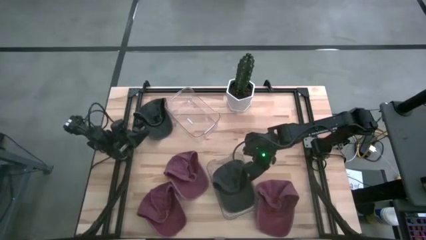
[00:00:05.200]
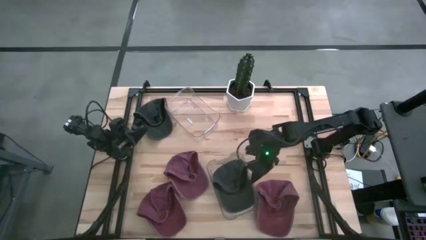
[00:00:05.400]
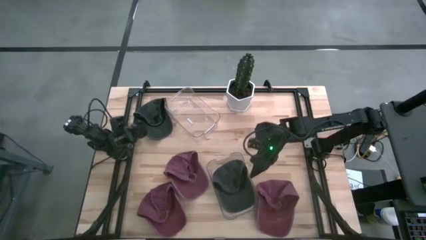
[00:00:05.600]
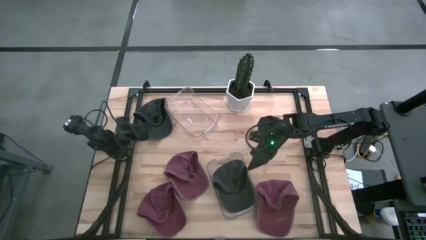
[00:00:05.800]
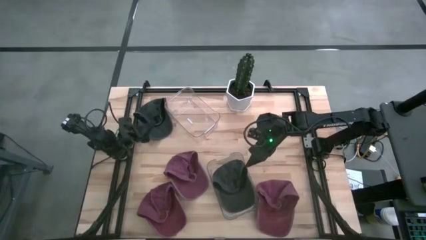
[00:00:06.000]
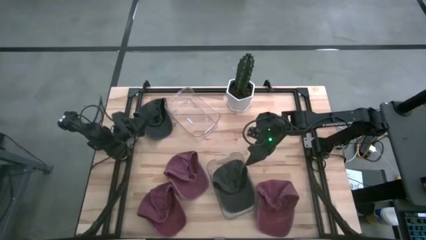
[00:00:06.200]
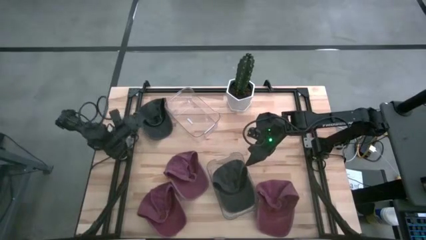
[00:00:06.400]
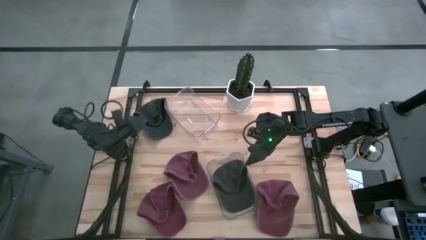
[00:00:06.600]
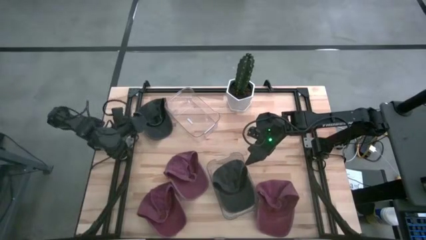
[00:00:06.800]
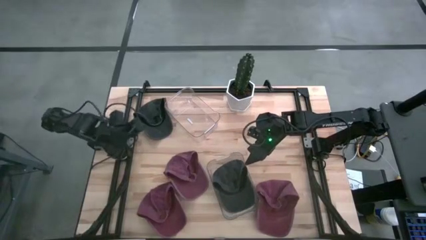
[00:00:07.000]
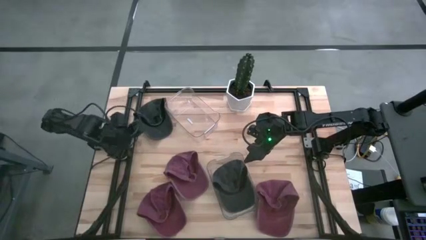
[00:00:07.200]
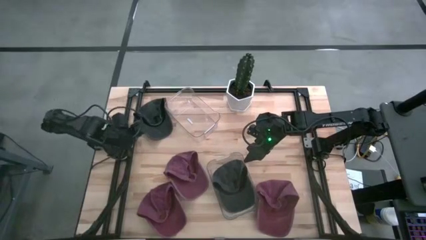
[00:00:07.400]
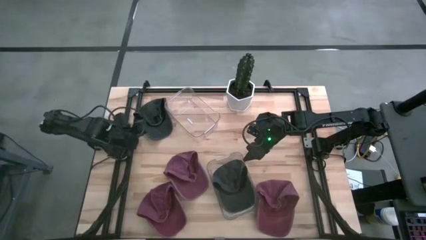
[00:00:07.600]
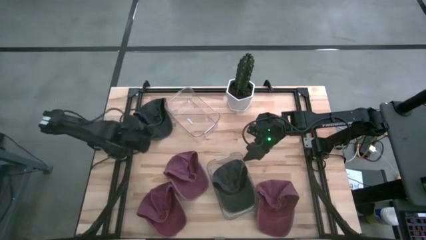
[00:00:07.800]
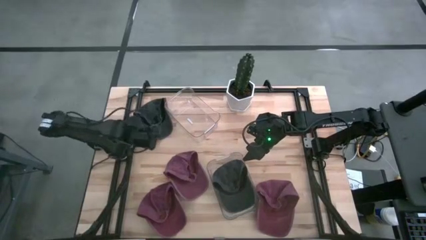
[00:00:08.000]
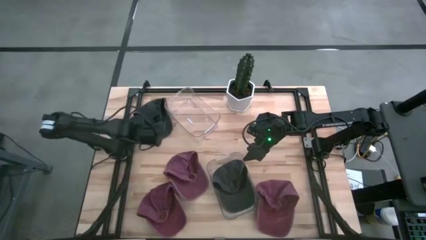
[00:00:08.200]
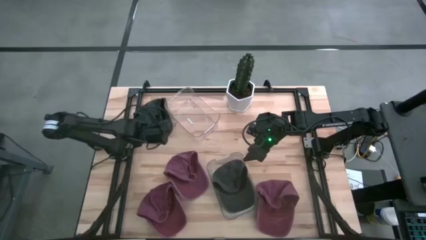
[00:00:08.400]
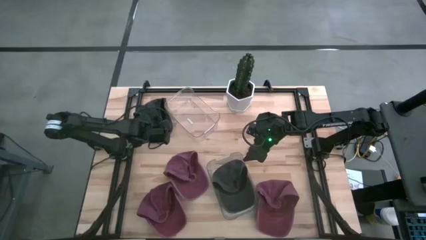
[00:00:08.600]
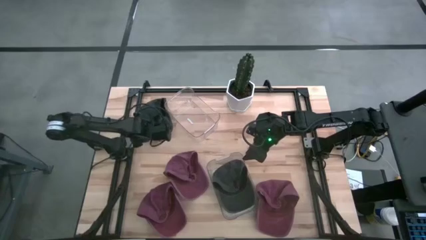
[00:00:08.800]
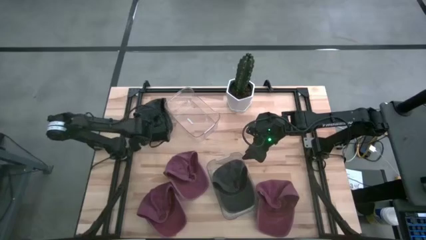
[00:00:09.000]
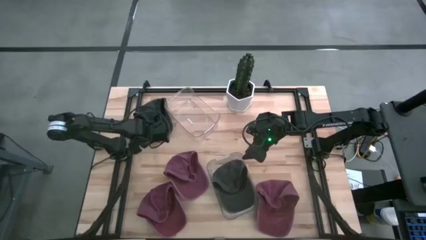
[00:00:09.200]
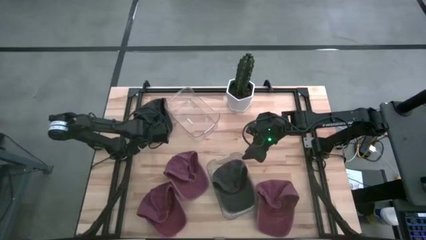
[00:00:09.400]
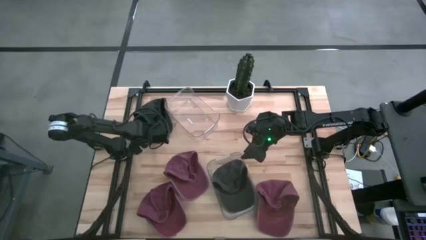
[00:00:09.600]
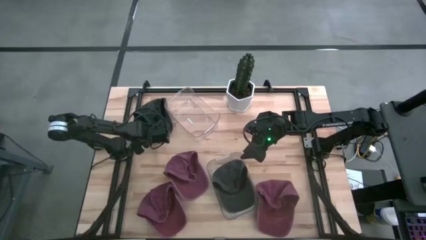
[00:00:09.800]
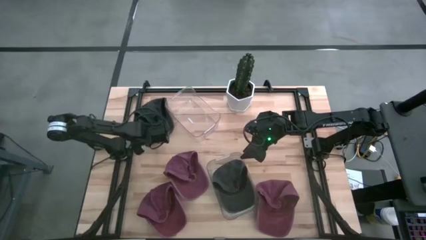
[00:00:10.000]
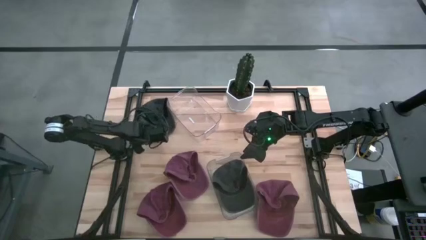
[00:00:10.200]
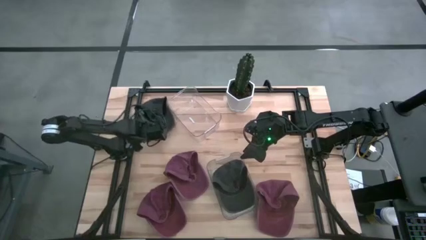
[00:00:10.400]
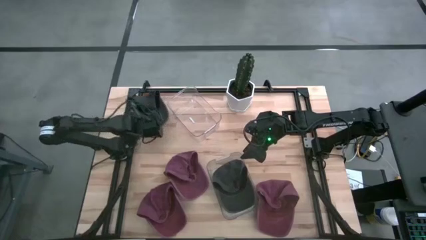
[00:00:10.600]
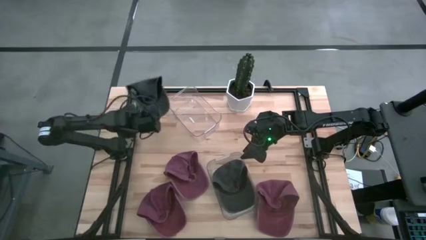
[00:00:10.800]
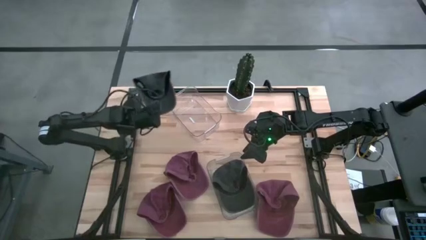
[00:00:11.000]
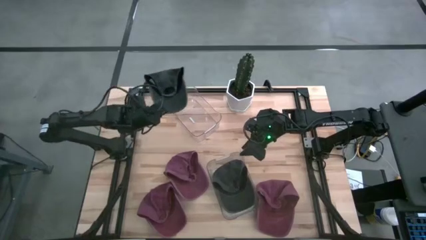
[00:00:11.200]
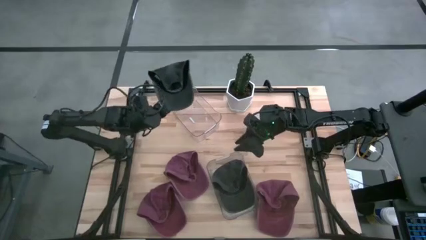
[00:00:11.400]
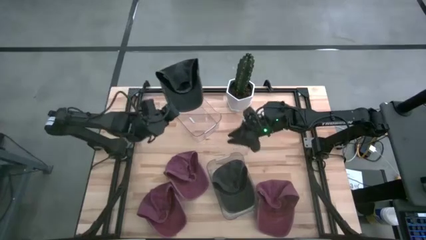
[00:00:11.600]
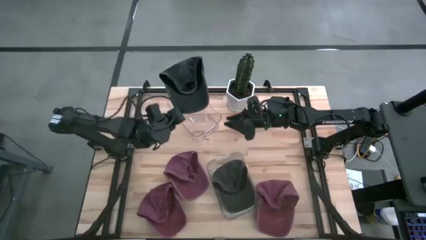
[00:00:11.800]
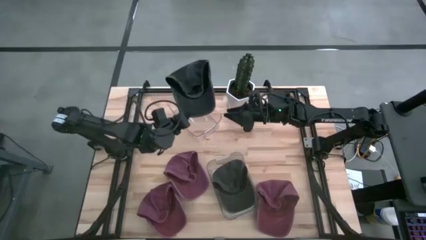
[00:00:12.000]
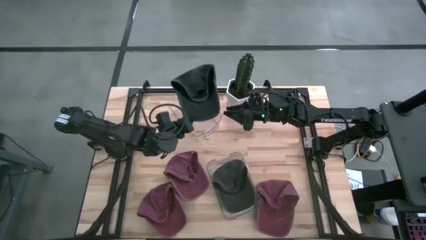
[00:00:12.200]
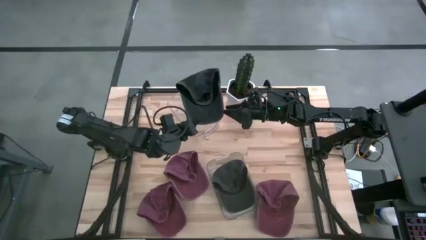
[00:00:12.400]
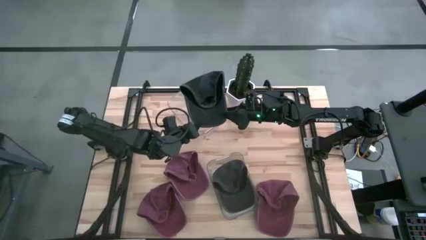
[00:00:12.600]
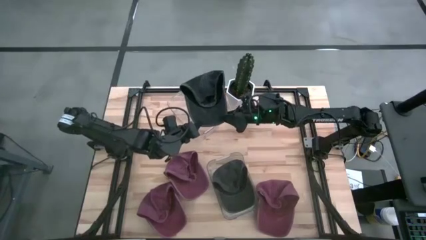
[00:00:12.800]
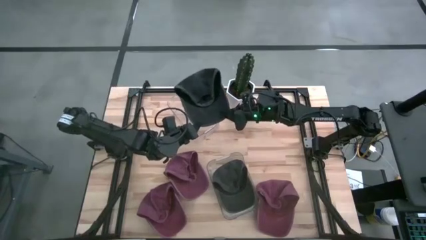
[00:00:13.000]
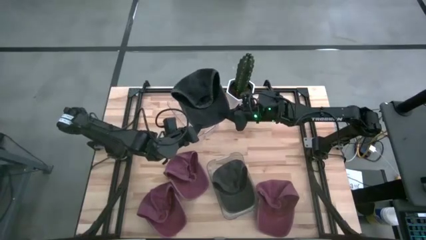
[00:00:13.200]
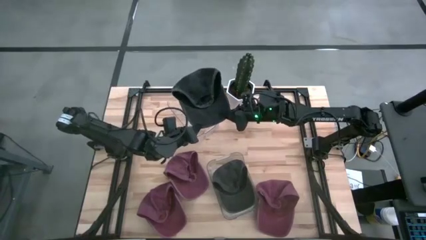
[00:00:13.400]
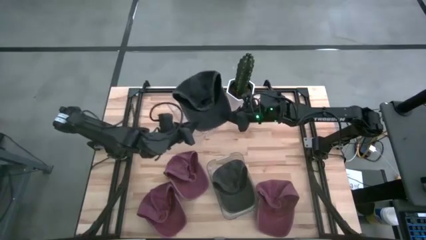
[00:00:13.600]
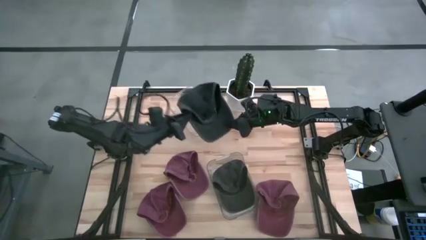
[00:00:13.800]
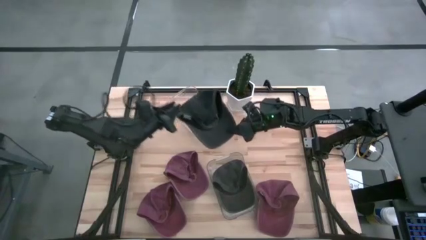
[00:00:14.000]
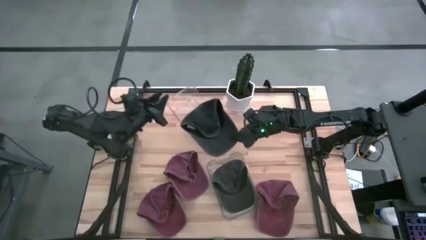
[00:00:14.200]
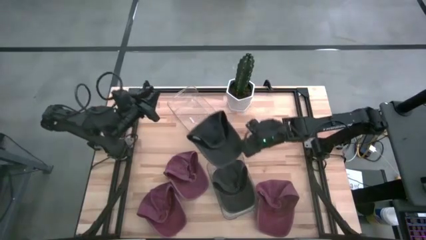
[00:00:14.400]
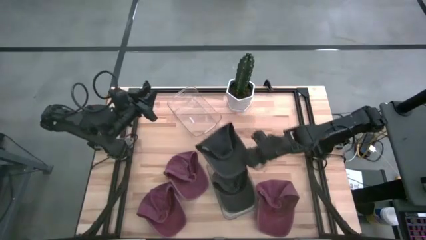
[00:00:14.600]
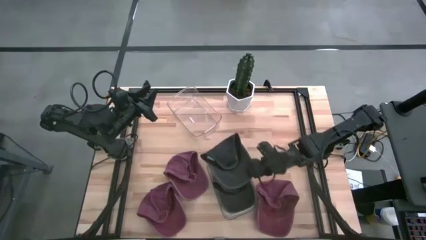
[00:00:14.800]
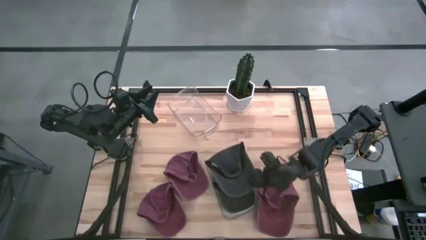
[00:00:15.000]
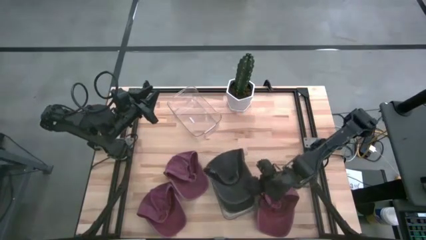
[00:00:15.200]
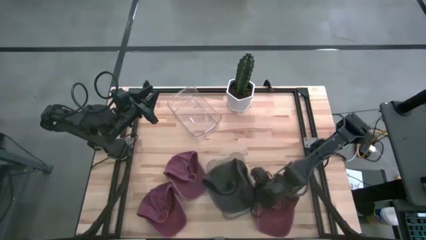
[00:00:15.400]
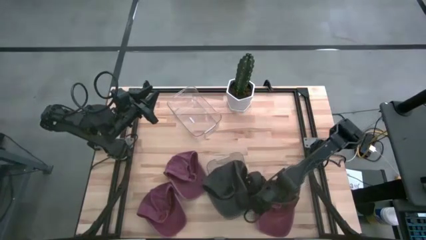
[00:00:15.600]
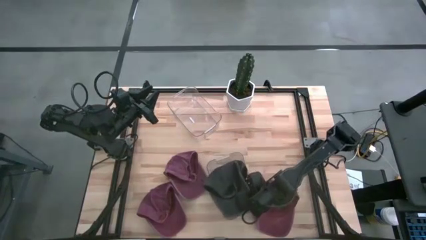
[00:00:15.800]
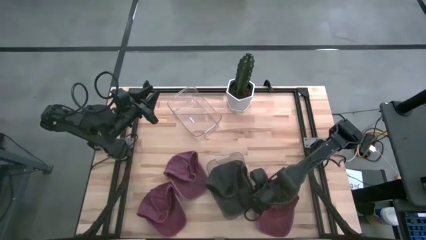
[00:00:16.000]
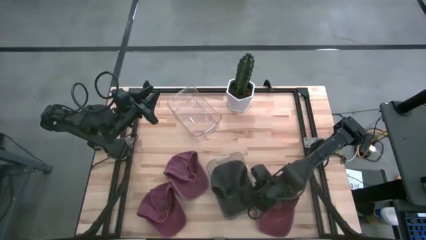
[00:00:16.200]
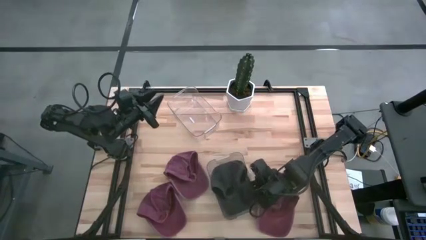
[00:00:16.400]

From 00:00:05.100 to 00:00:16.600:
Task: Pick & Place hat
Put the black cap into the bottom transparent bin

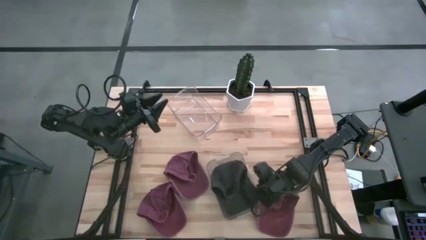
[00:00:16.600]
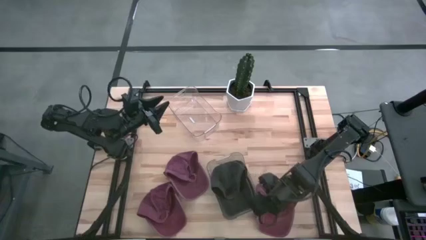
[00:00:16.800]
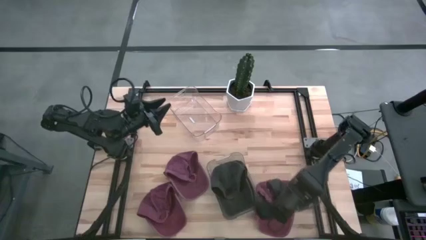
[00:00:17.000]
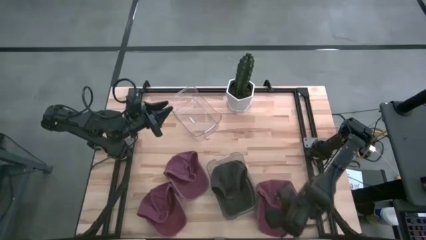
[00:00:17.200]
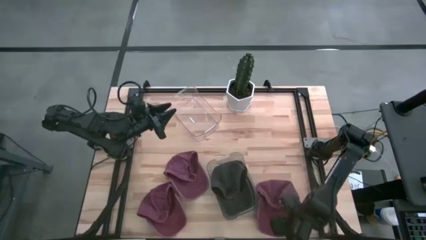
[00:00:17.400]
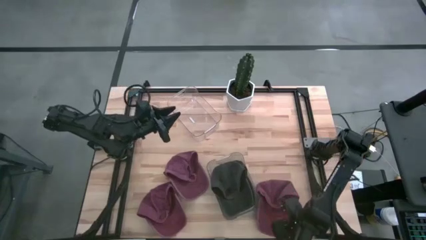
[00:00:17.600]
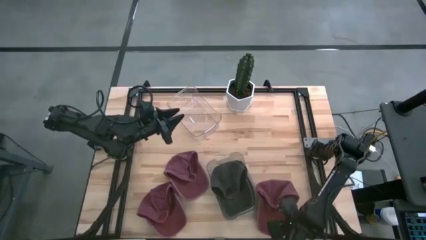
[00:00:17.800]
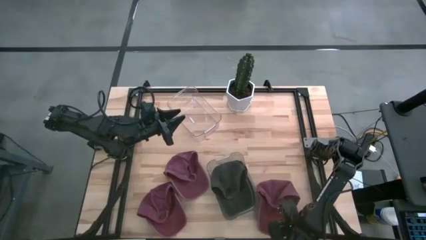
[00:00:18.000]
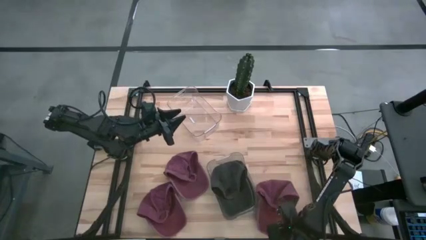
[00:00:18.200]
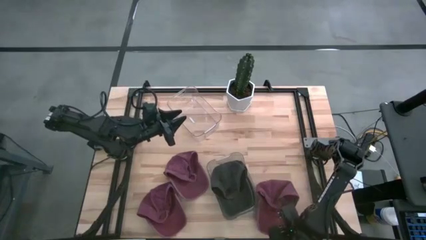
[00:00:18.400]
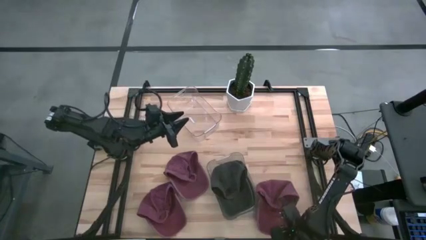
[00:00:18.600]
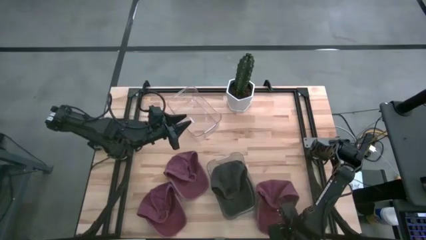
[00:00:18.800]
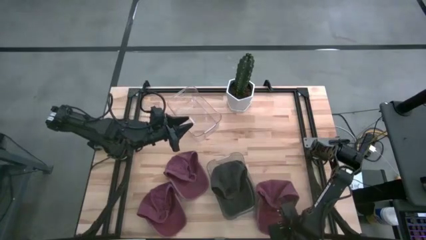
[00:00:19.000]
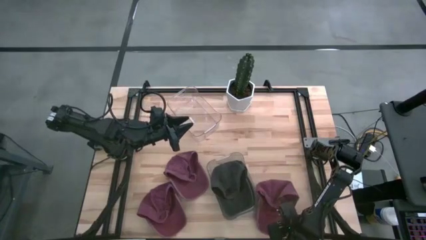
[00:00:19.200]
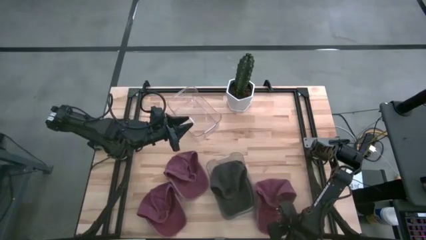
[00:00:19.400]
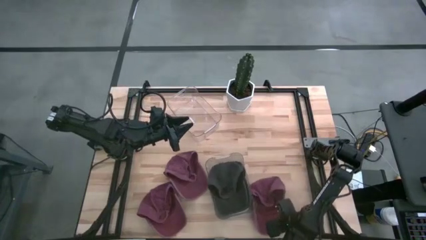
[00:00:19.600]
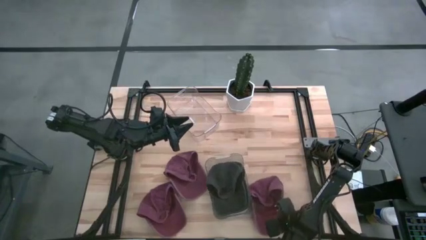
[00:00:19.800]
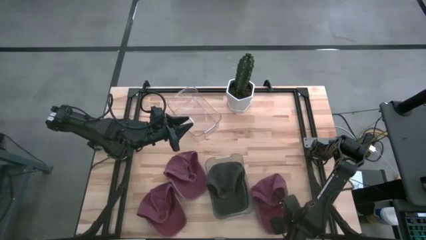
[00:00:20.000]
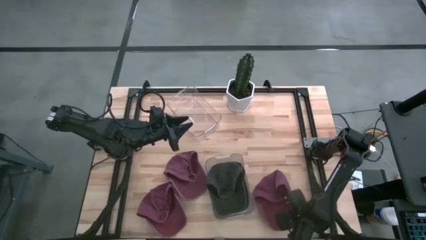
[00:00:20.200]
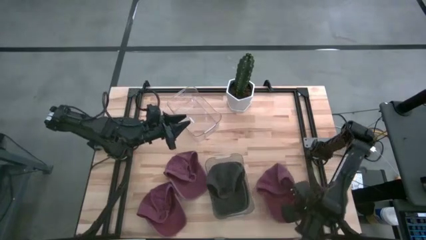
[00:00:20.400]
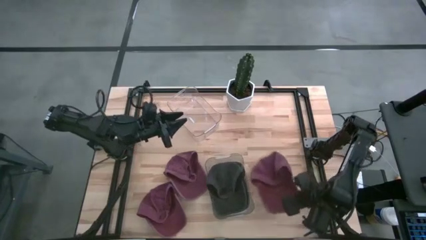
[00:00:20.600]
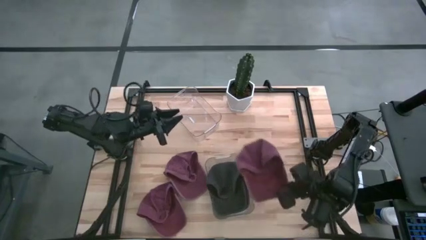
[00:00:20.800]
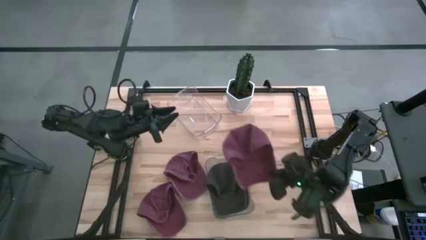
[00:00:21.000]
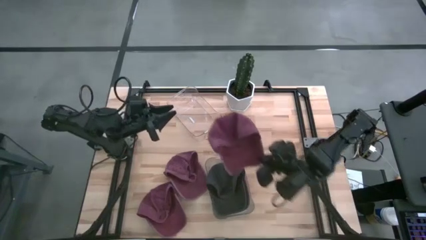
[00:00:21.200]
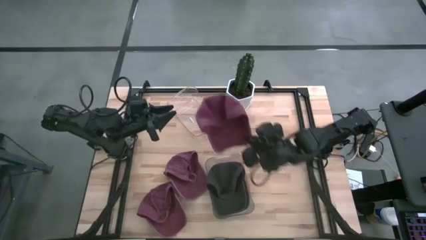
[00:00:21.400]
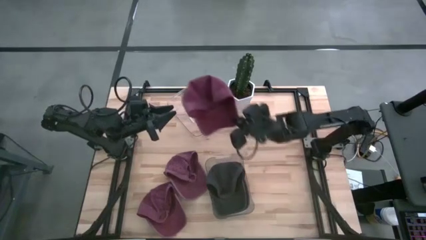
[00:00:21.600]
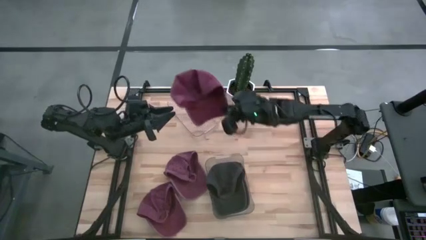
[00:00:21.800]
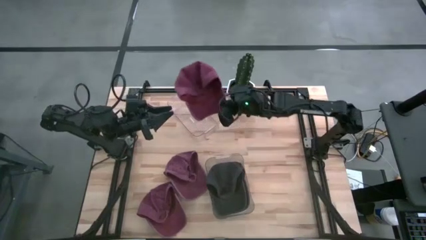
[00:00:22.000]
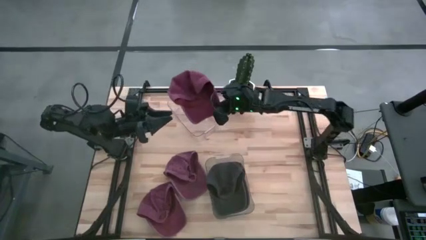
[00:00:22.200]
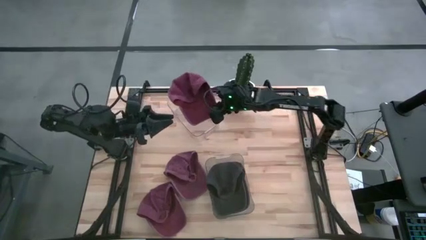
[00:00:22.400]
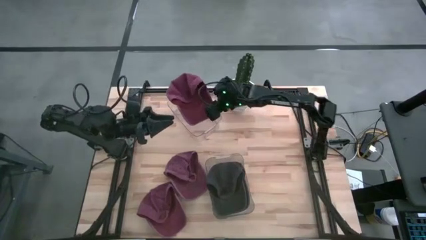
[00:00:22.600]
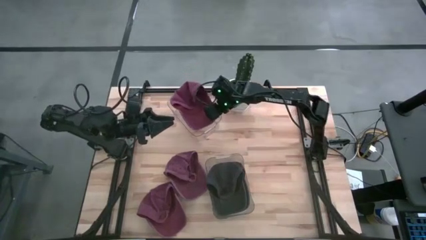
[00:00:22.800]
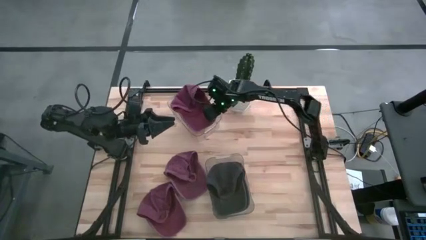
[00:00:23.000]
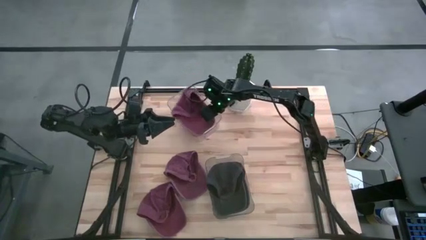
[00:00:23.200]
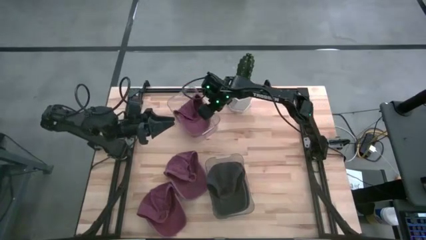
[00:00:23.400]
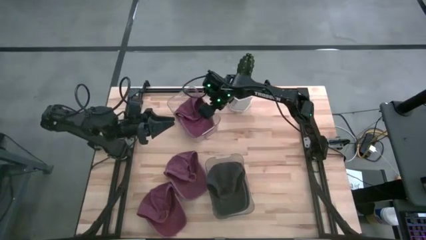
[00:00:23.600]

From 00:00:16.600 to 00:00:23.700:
Put the right red cap into the top transparent bin
